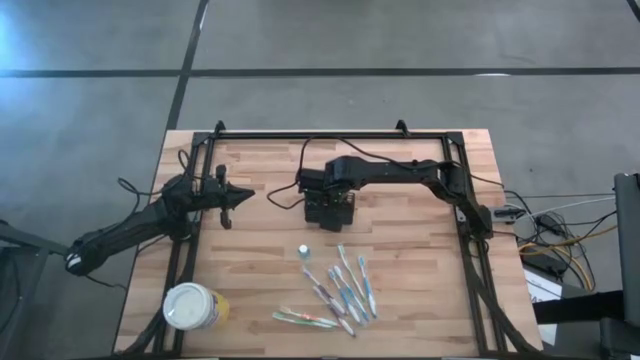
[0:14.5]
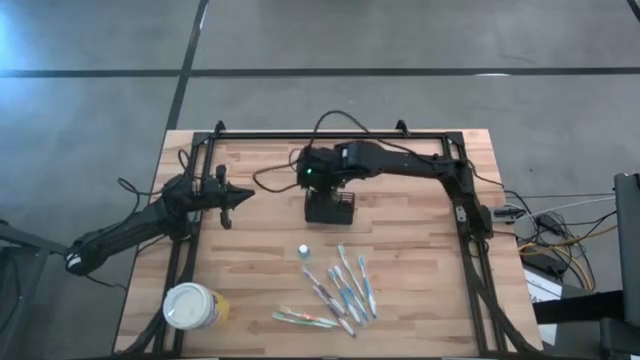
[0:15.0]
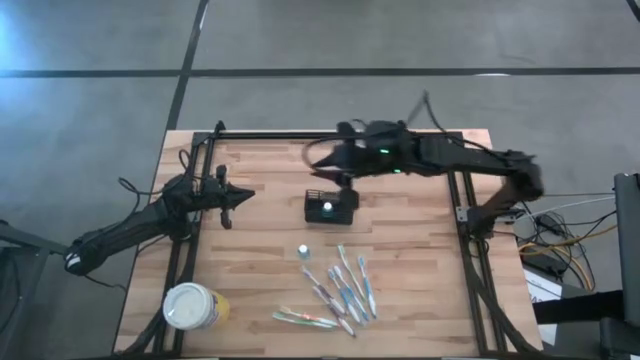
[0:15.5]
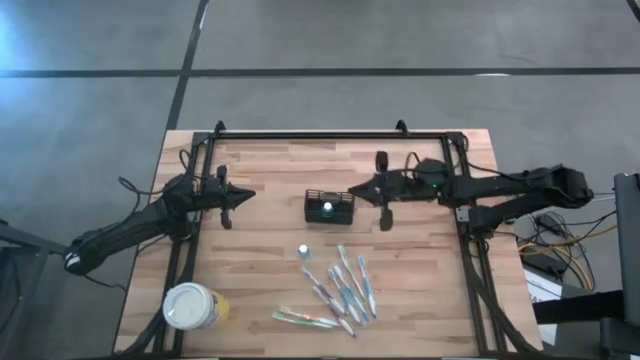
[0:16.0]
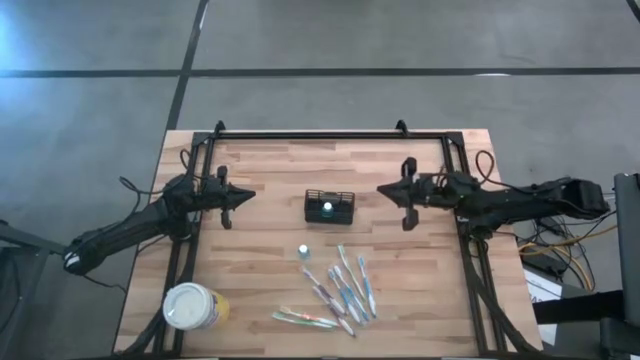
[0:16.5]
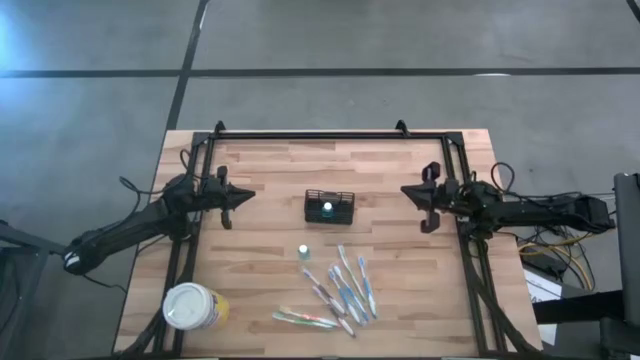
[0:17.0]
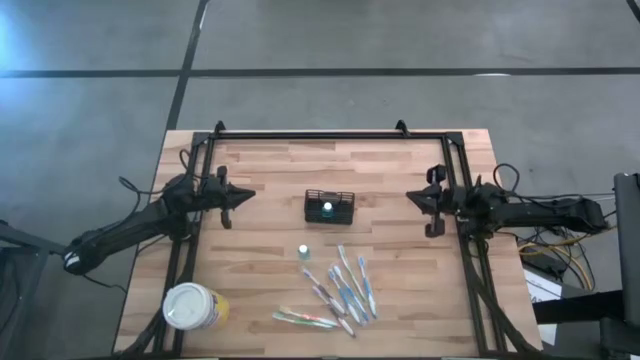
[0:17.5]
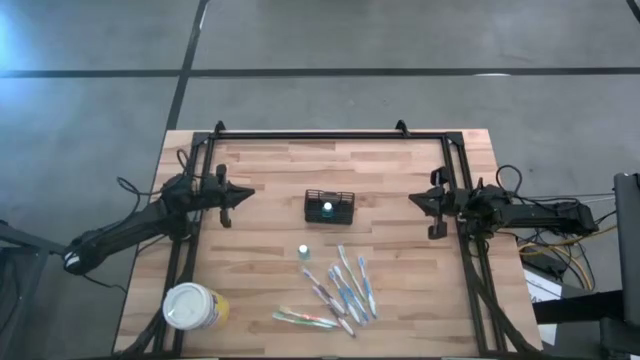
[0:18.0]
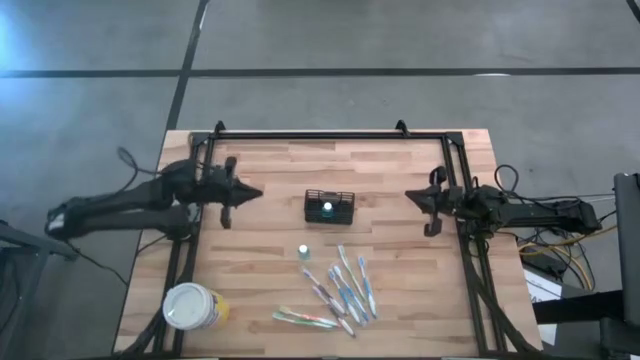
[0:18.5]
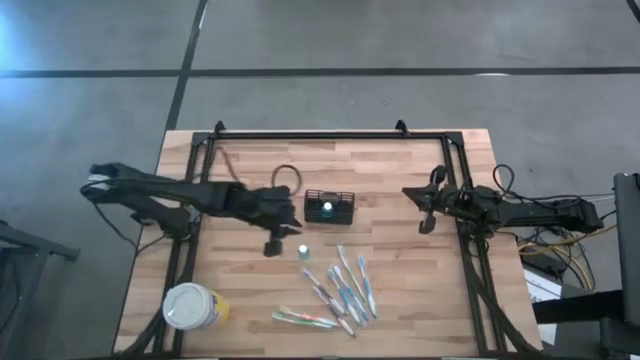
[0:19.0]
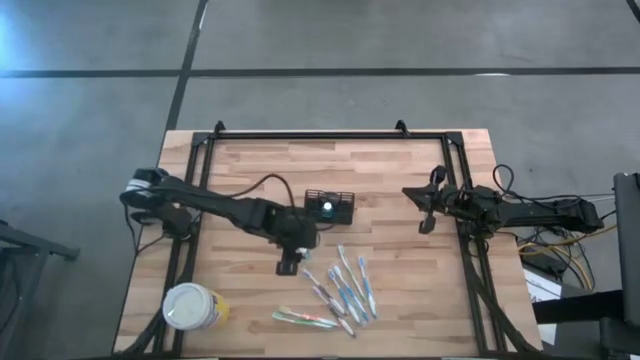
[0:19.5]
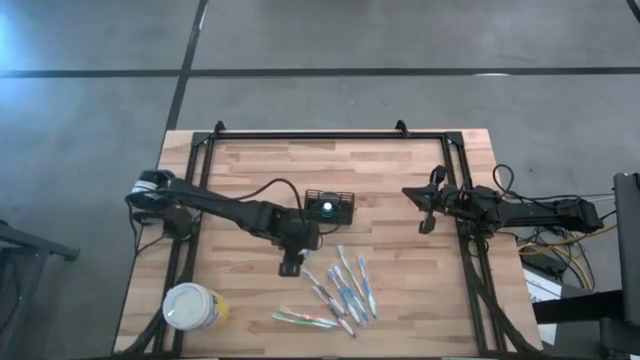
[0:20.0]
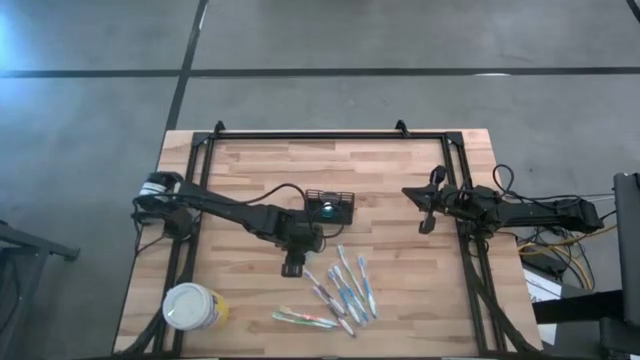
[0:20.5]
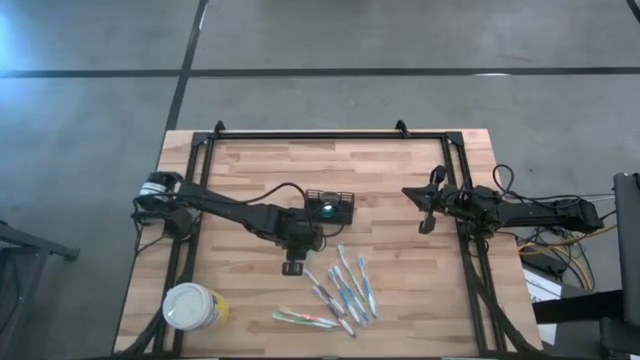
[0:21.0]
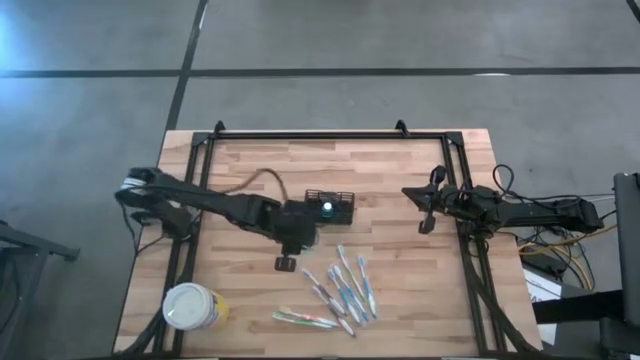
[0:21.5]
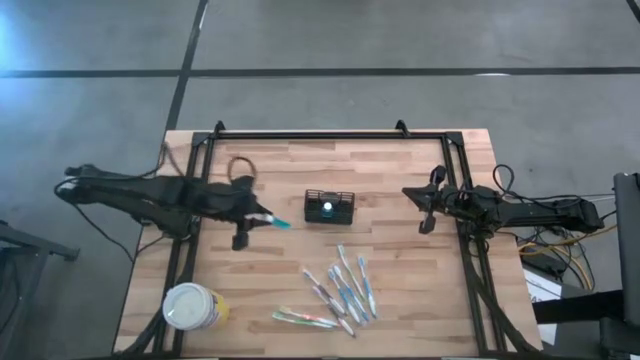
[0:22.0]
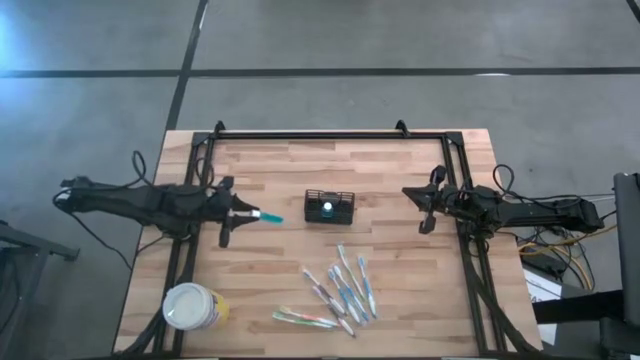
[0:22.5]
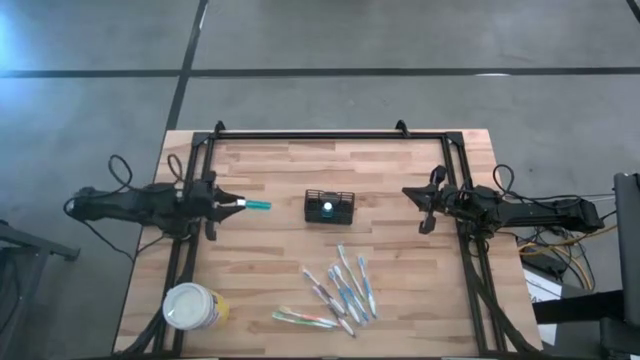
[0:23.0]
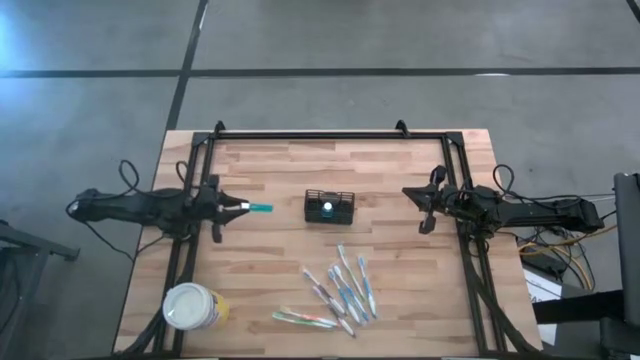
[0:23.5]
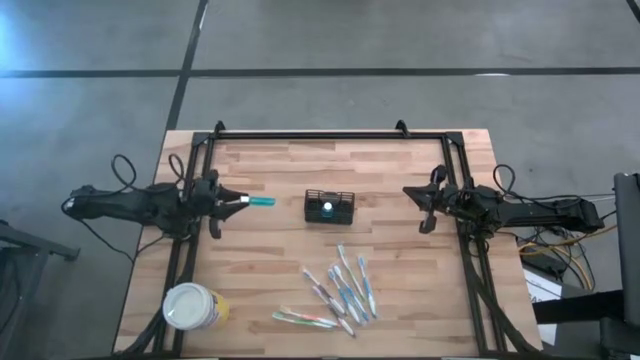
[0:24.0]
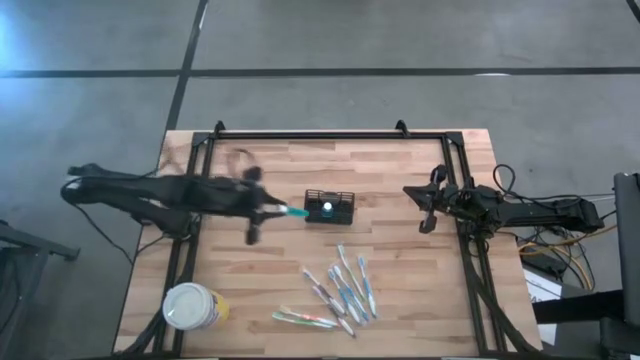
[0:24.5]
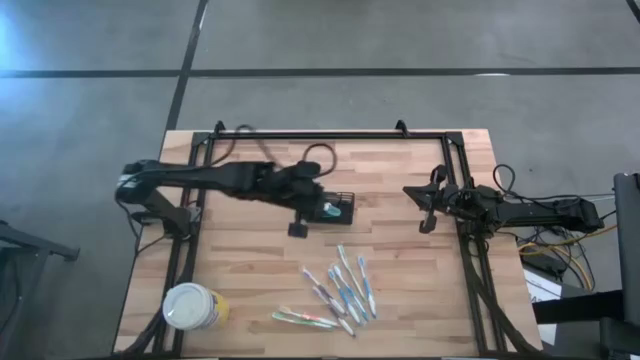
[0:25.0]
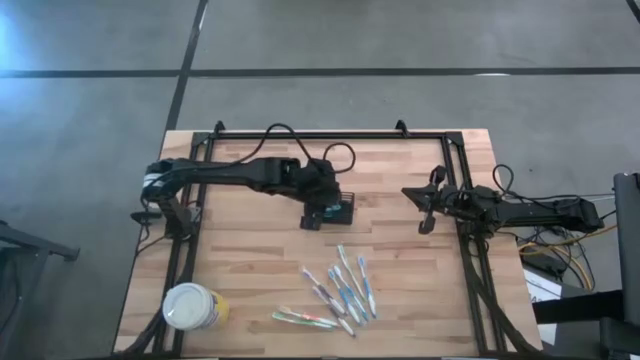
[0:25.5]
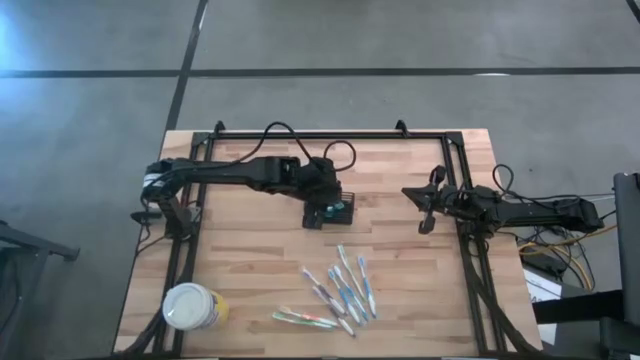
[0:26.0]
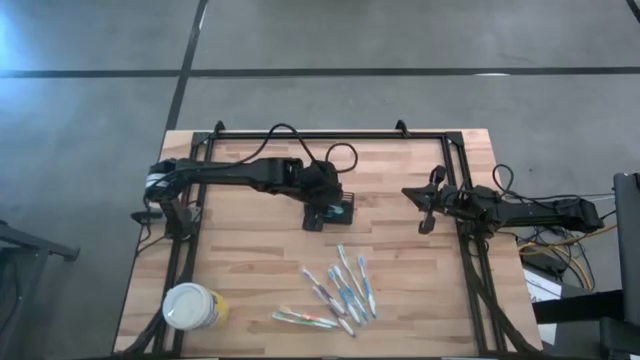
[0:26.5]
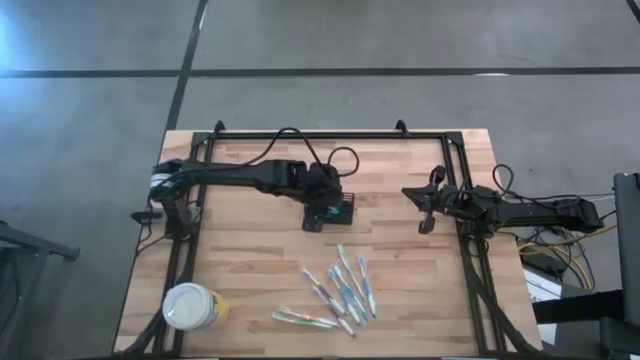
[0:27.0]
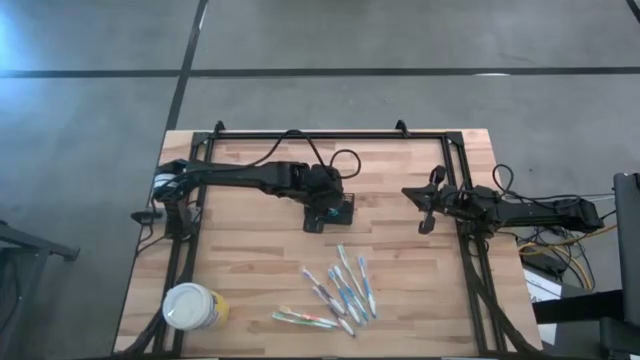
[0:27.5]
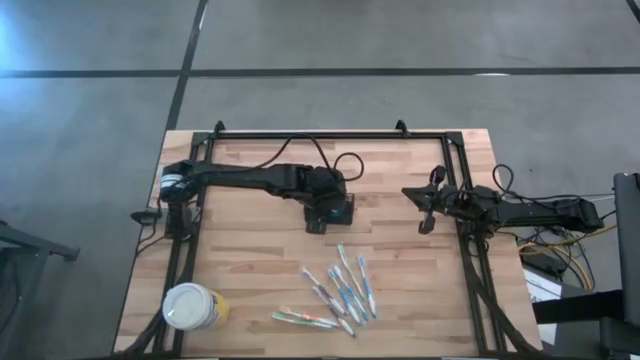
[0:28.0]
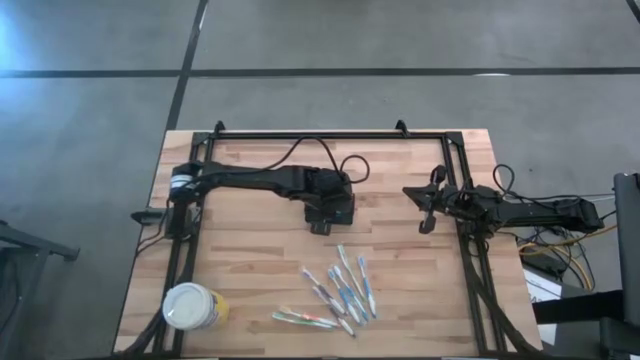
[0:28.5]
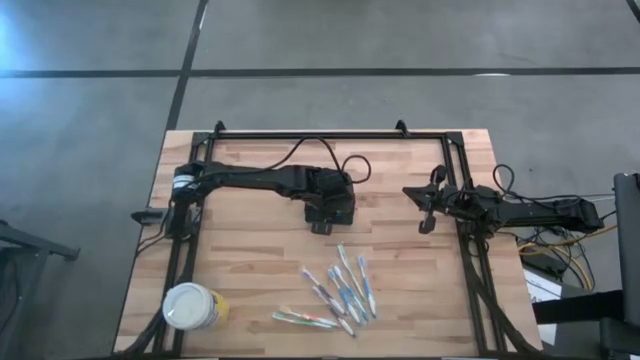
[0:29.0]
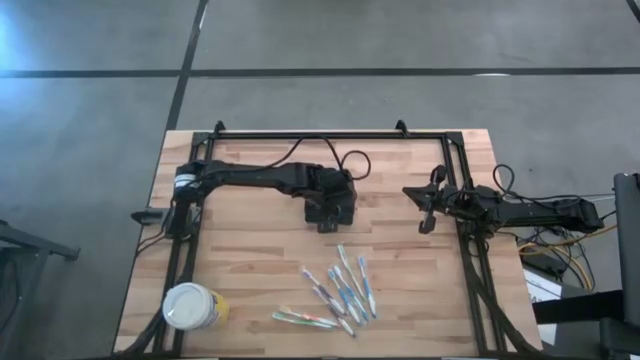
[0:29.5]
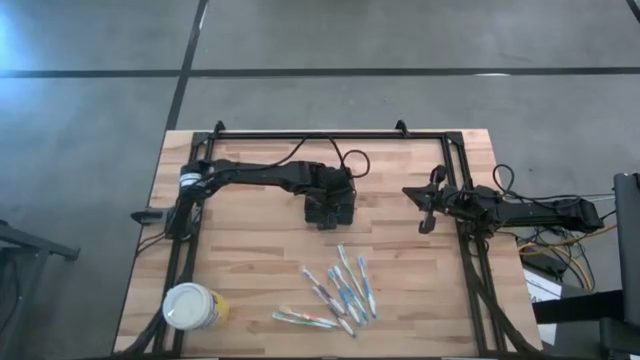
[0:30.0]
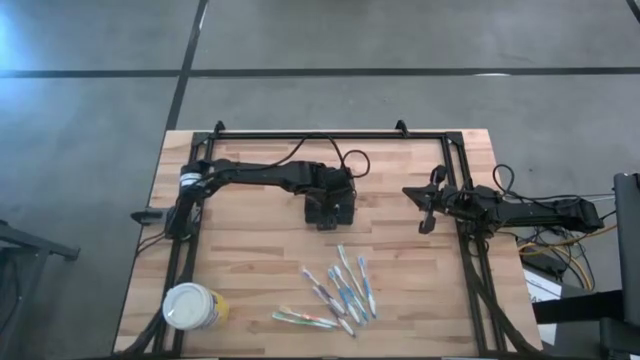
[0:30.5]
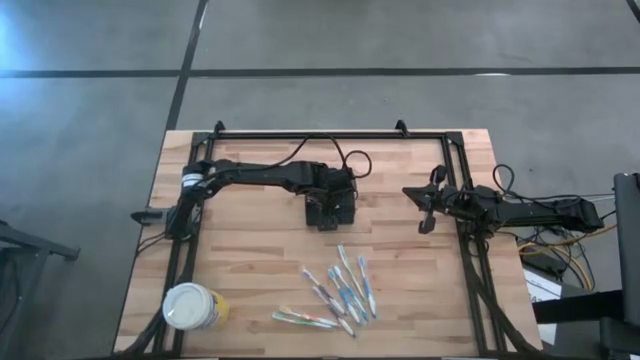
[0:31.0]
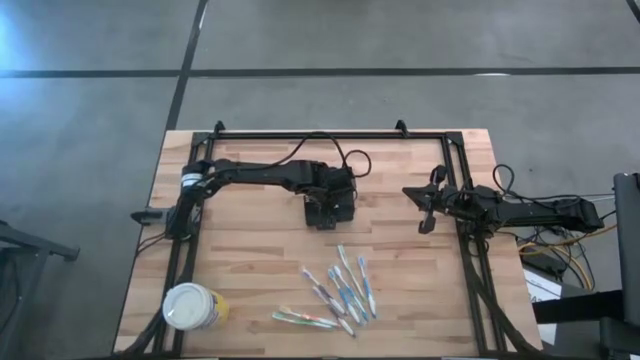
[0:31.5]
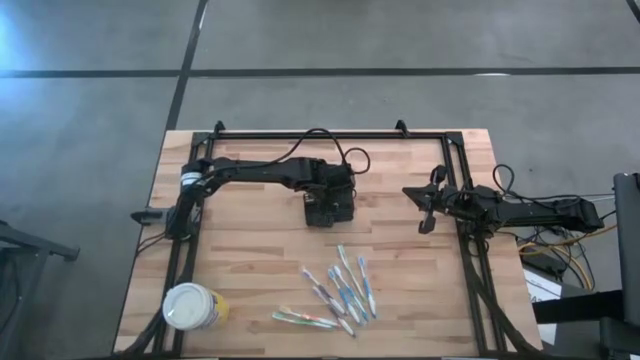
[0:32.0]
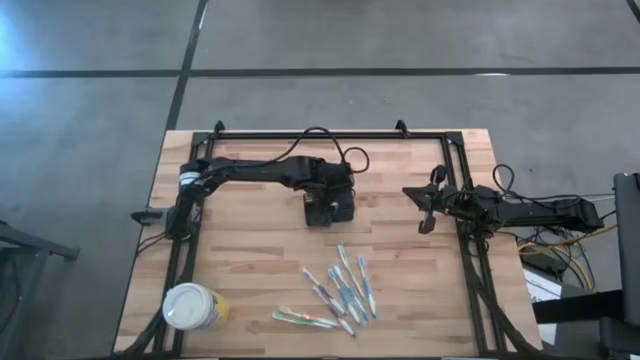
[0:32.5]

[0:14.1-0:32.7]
Task: Pick & Place toothbrushing station
Put the blue mouthwash into the wire organizer

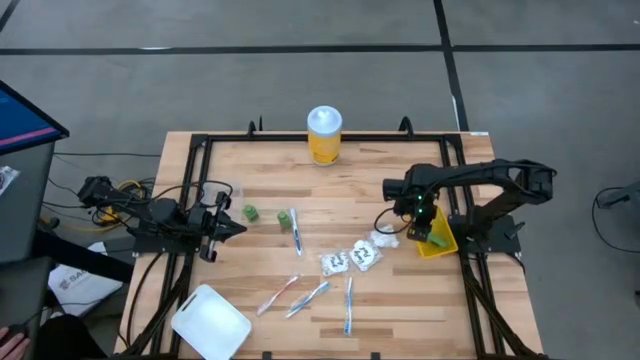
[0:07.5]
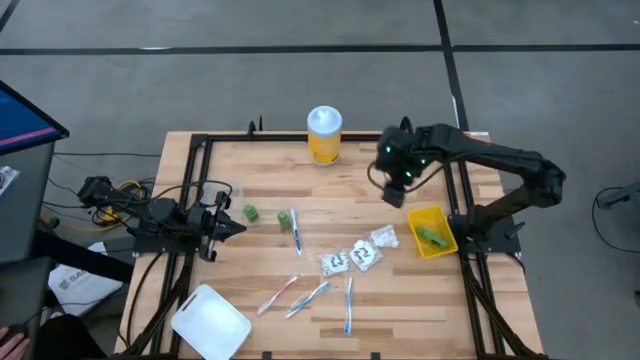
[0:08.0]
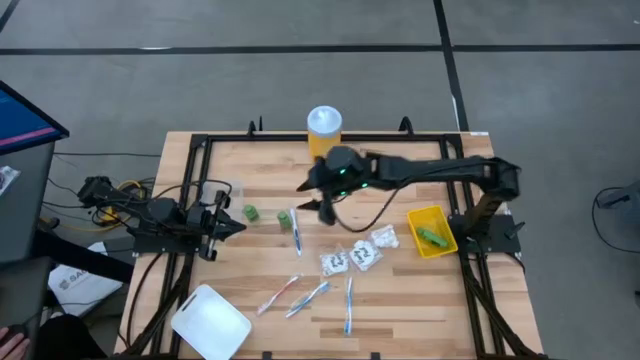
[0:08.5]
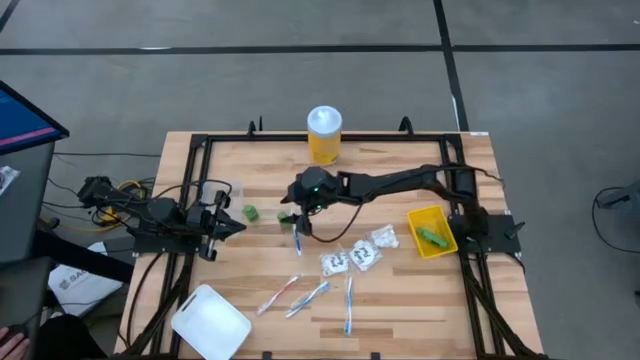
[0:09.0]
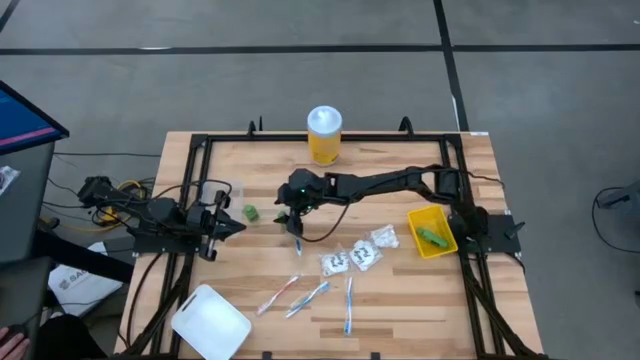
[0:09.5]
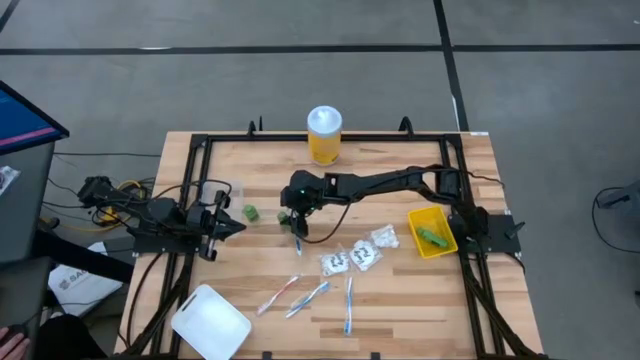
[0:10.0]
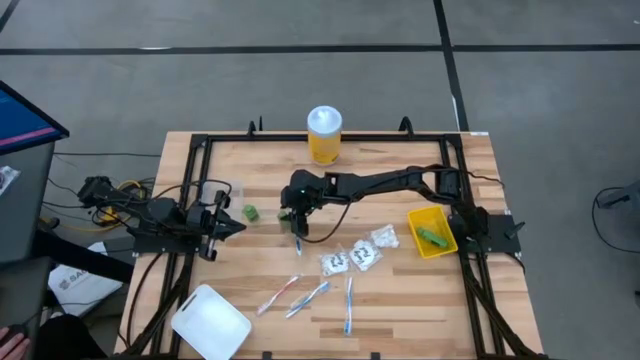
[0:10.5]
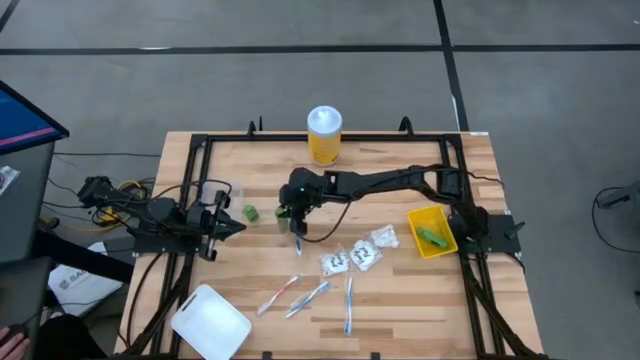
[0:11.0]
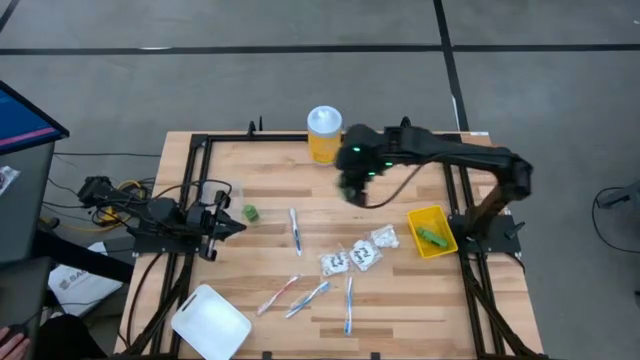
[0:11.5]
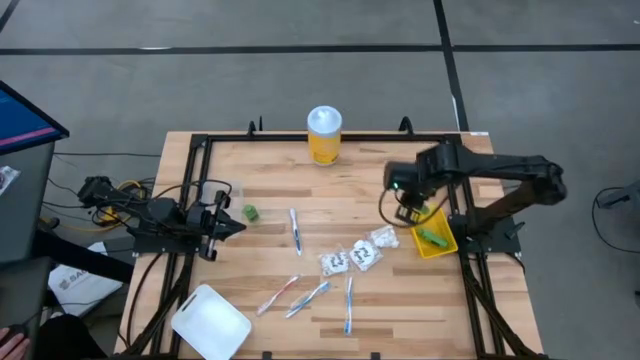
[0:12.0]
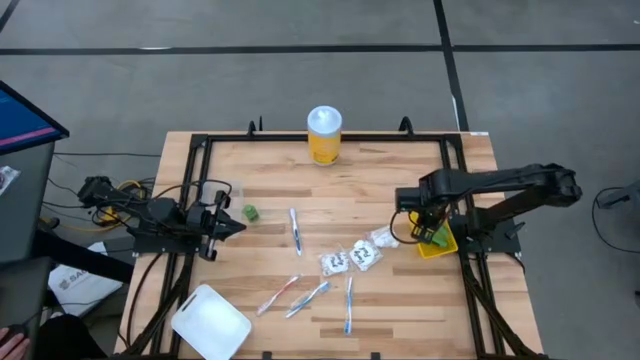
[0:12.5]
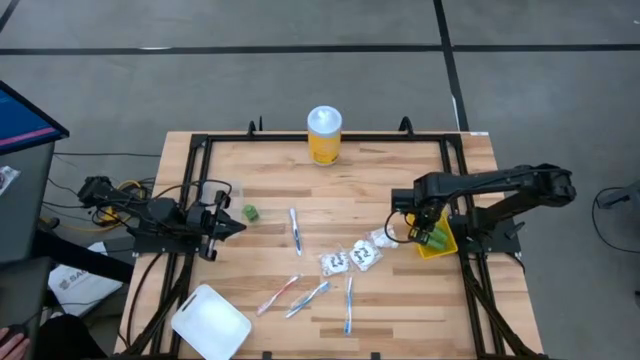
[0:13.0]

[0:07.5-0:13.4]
Task: Pick & Place Travel size toiletries
Put the right green shampoo into the yellow bin
